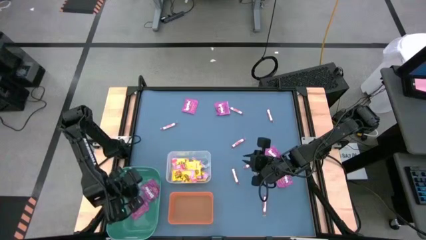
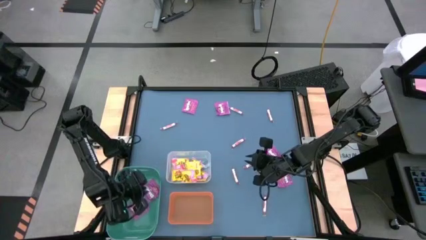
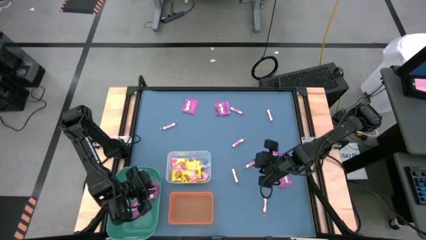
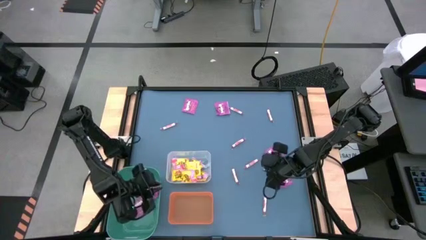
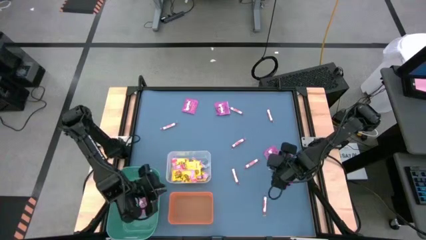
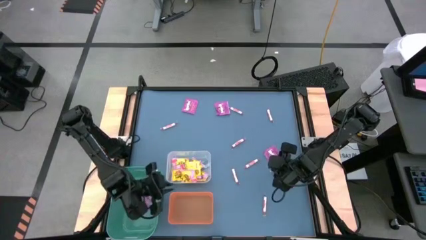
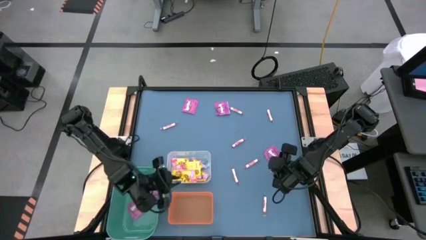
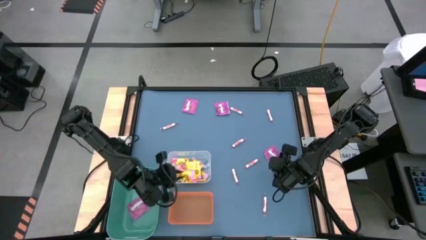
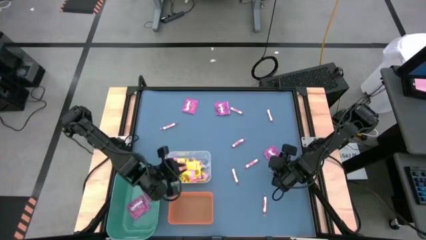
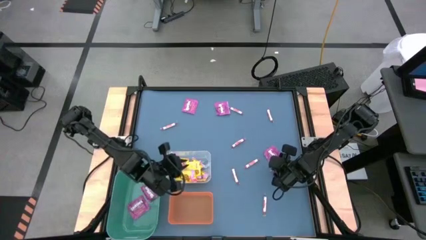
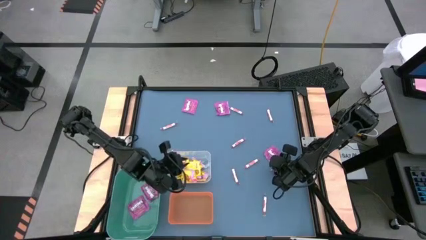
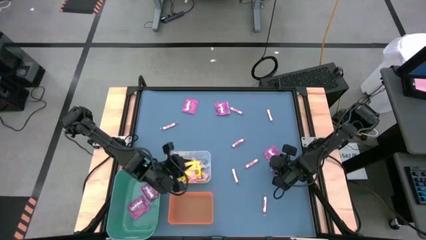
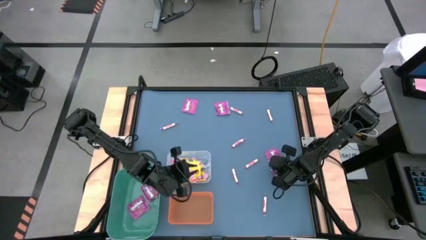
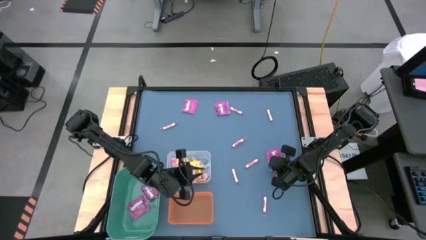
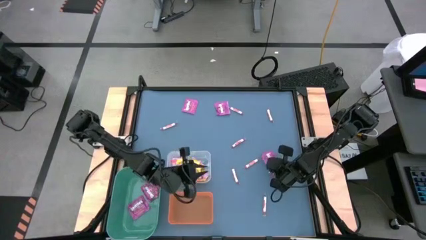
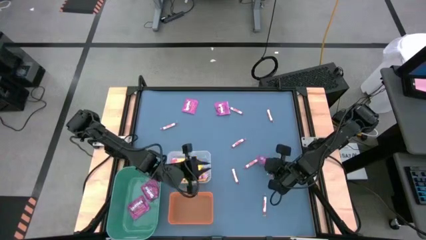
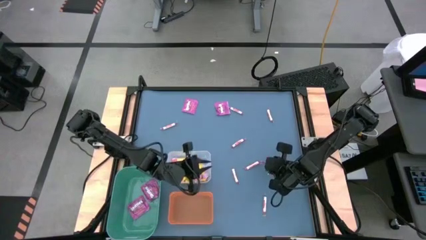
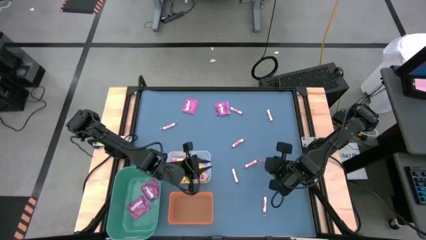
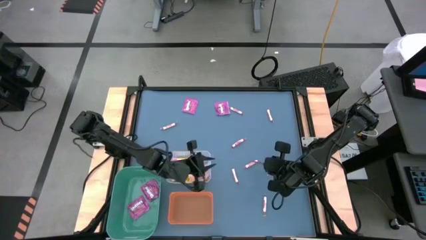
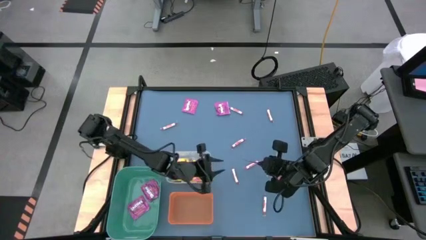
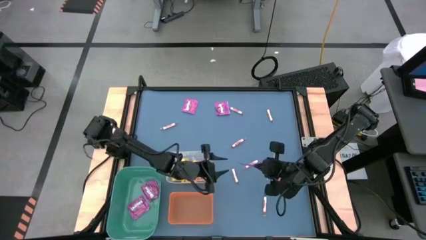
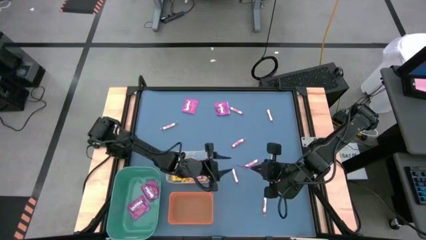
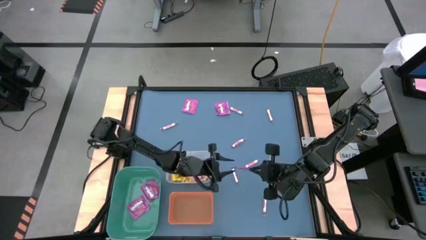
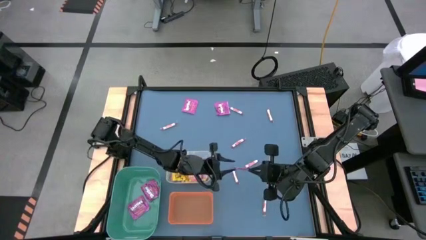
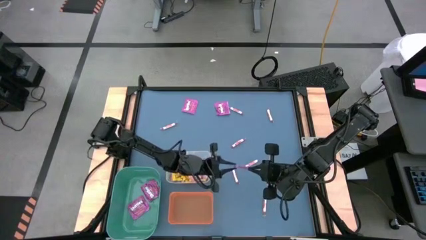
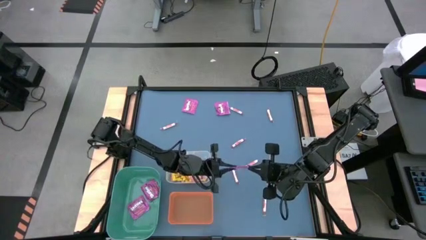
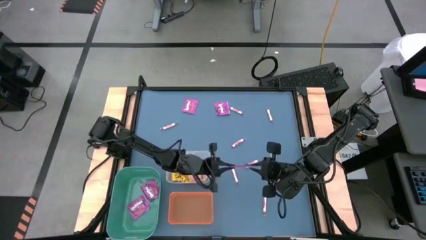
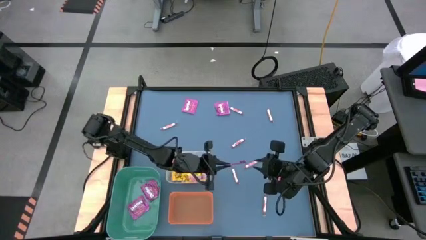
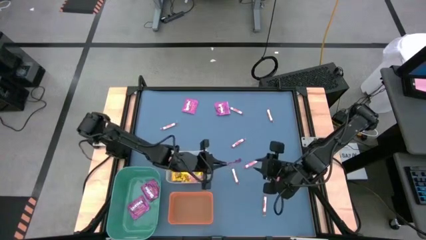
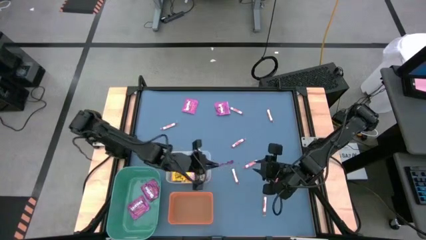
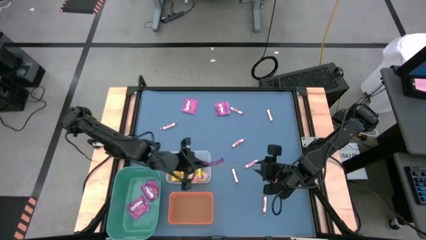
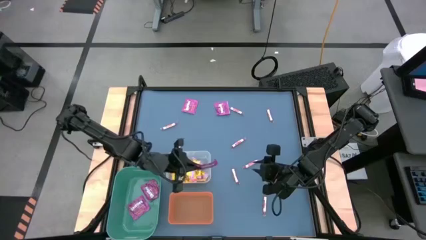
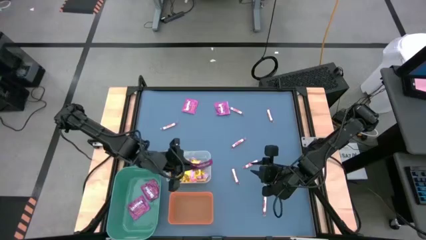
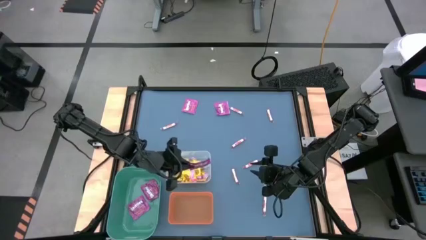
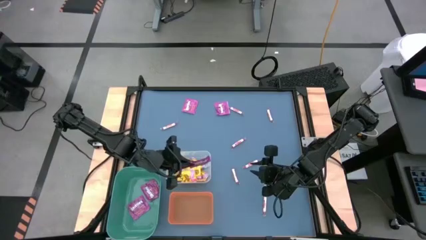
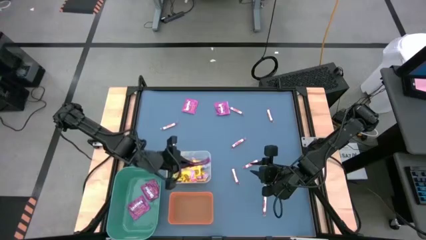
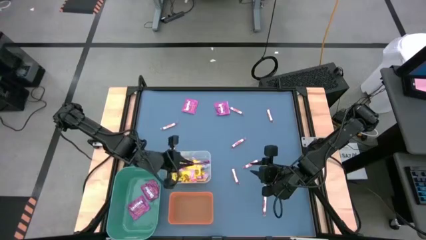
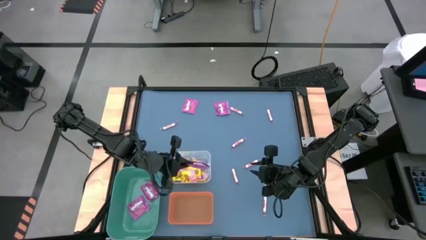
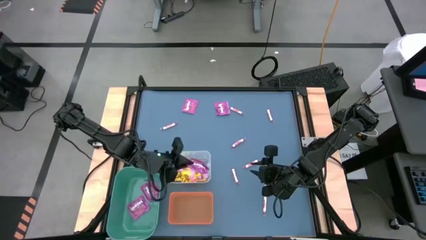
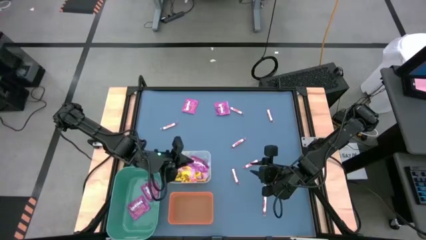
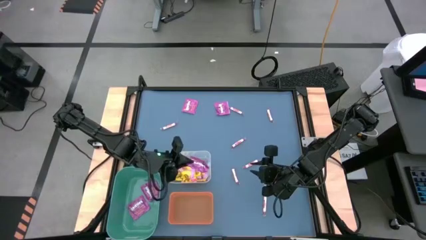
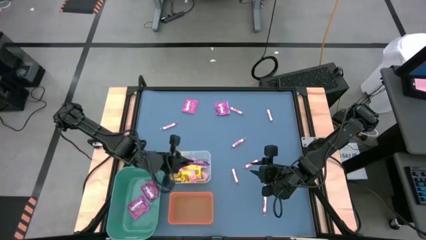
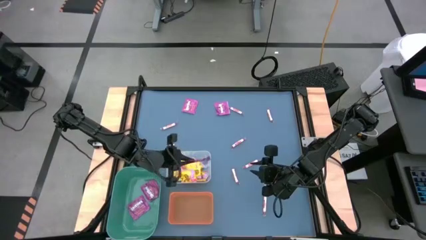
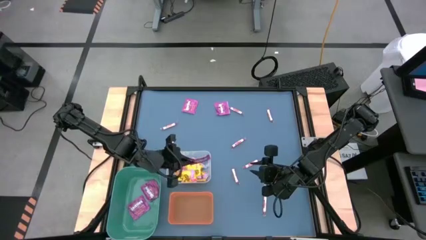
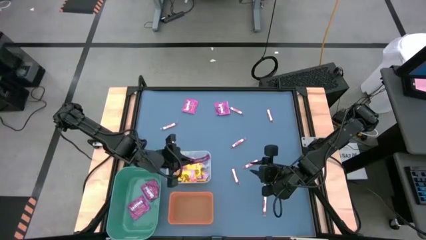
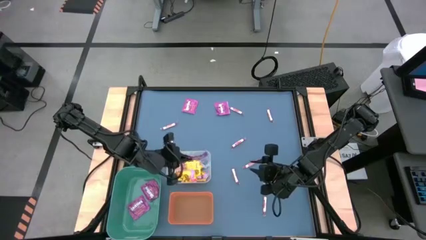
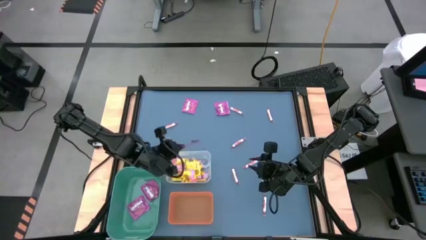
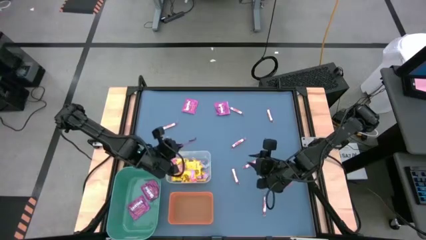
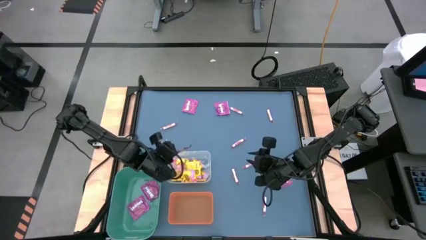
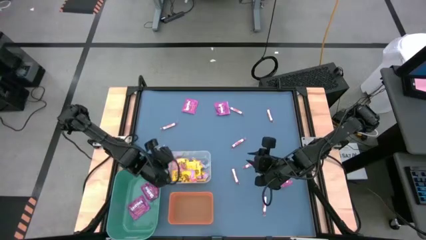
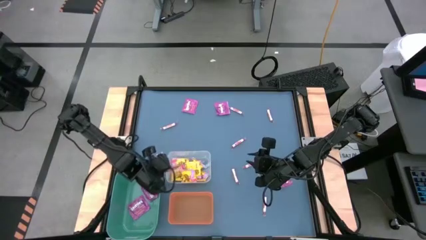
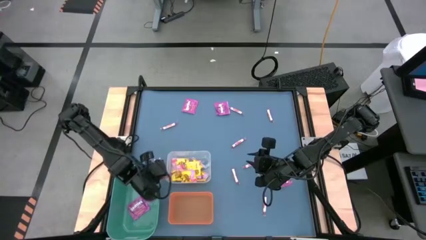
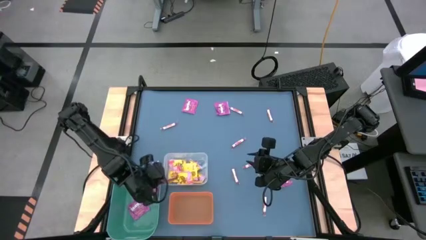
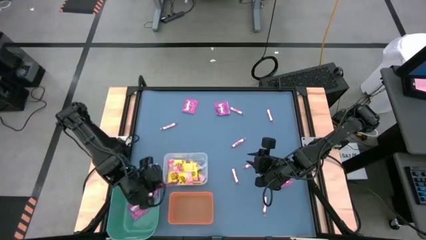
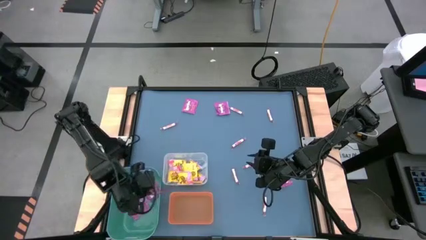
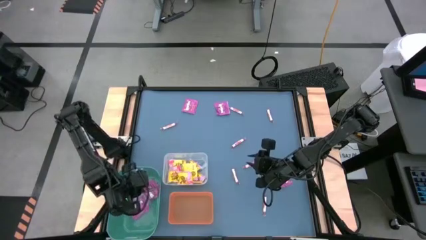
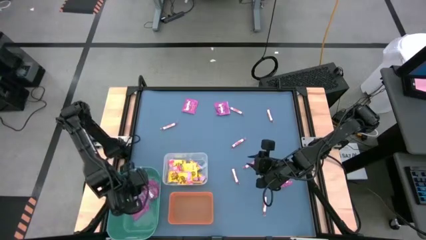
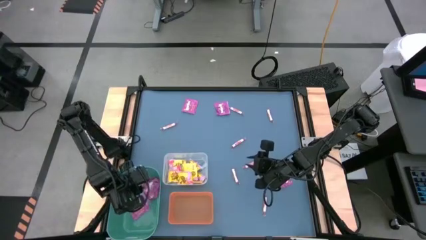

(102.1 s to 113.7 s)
Task: Sort candy
Put the purple candy into the green bin
